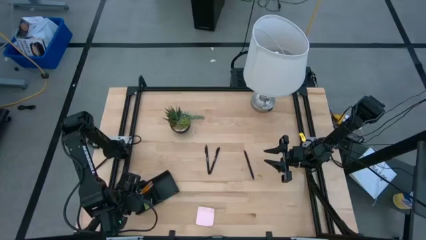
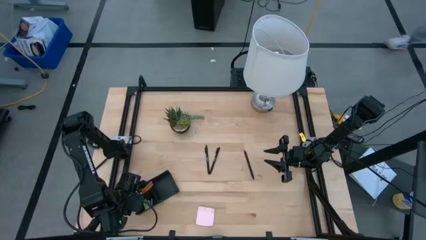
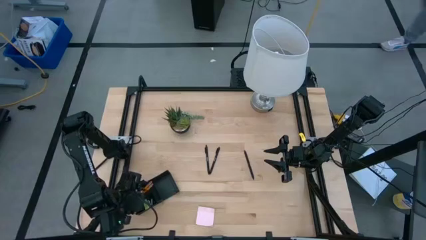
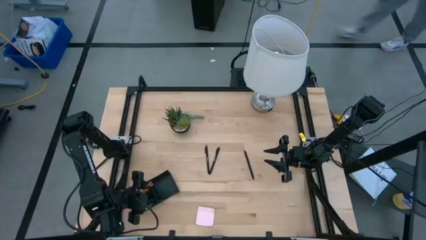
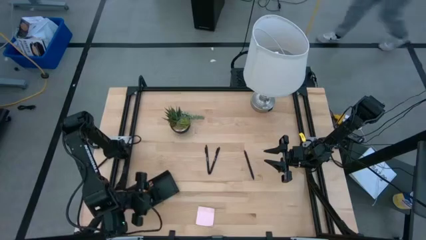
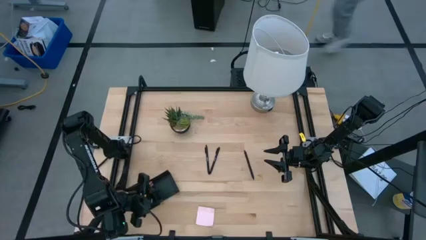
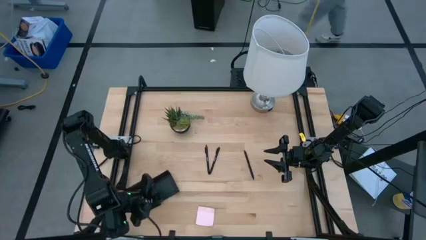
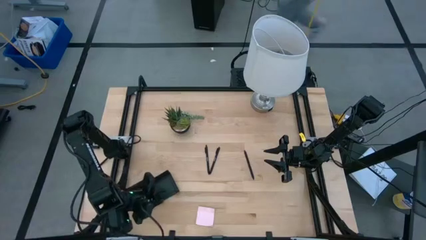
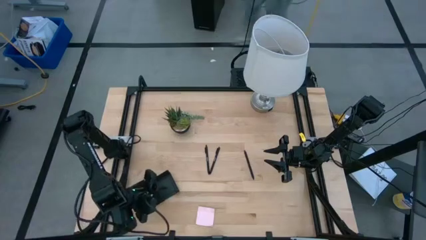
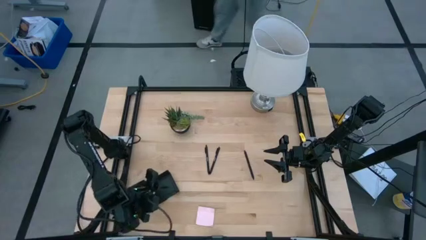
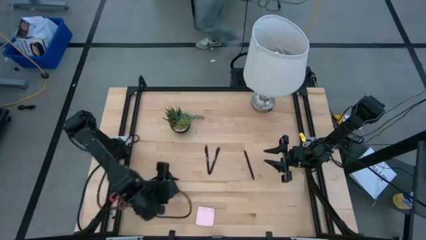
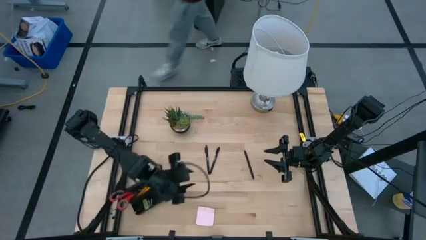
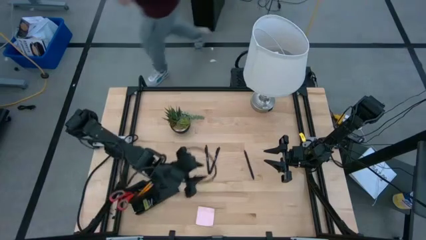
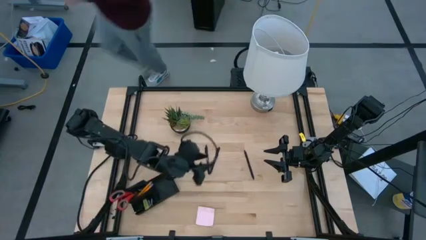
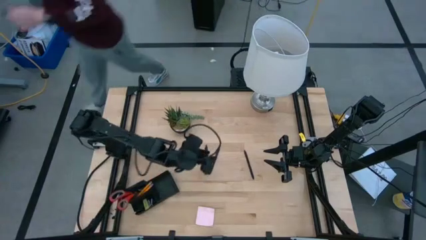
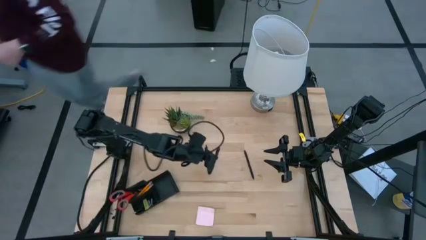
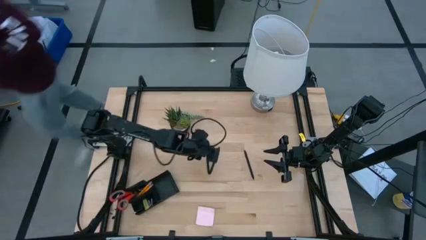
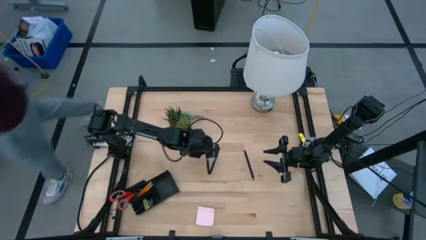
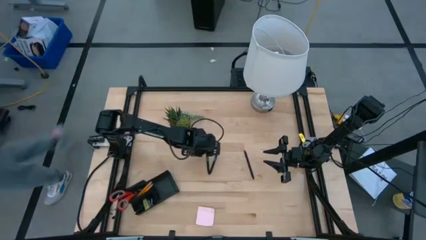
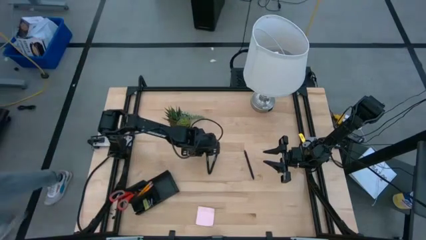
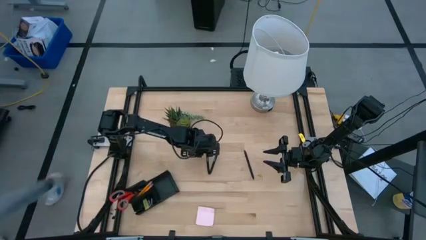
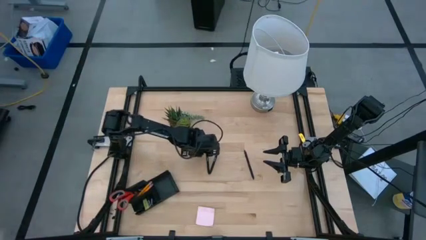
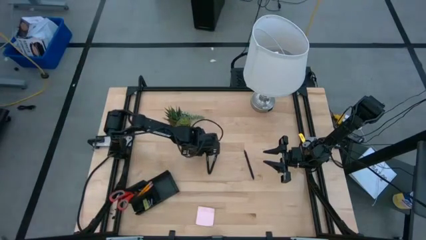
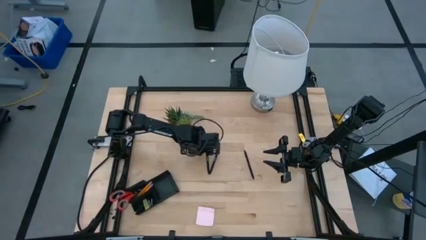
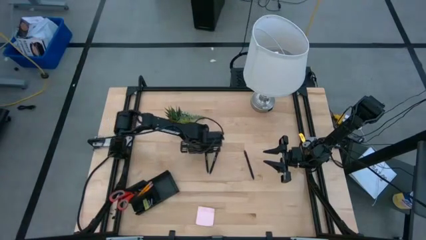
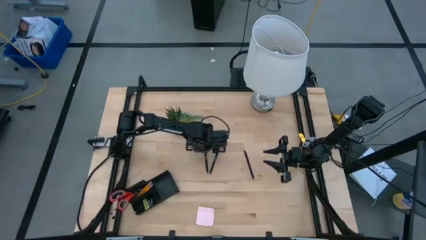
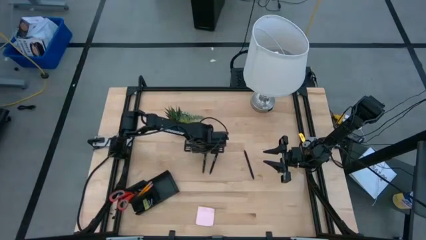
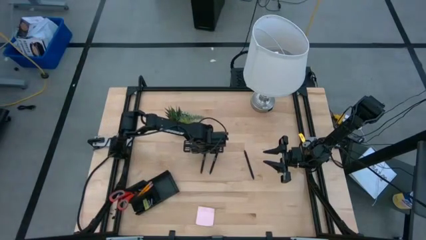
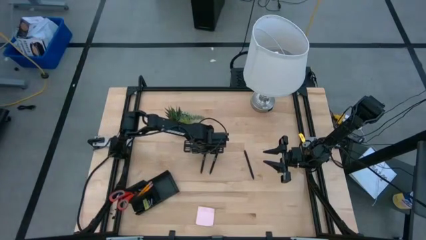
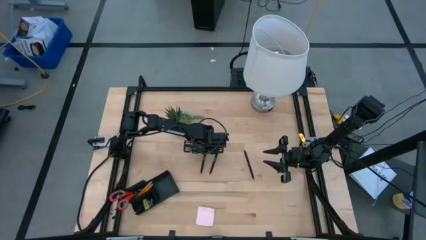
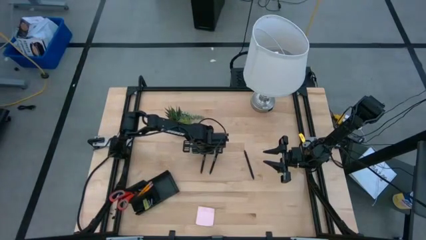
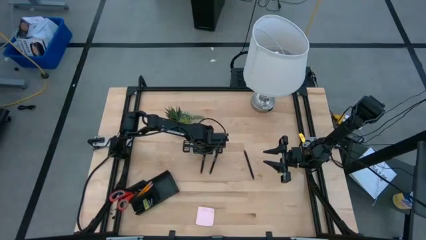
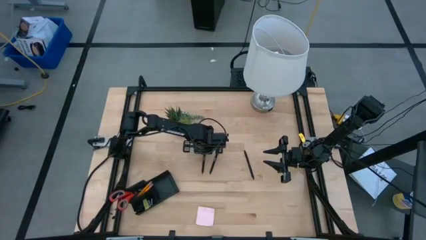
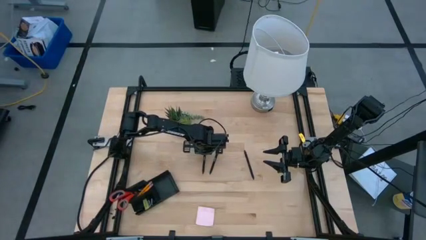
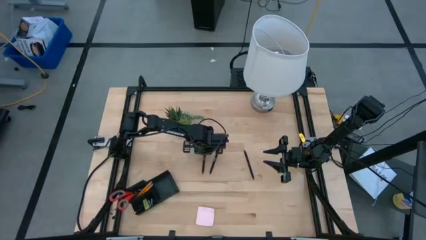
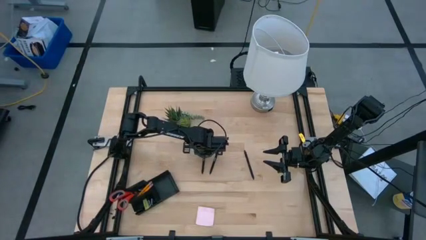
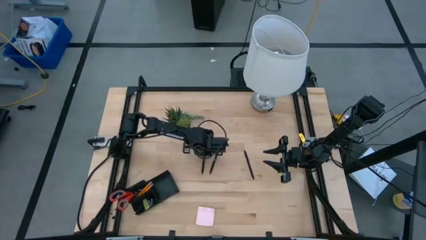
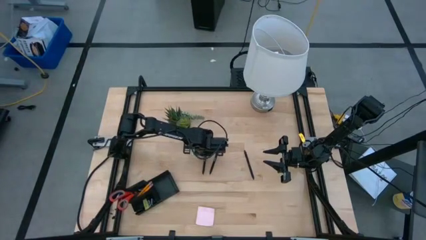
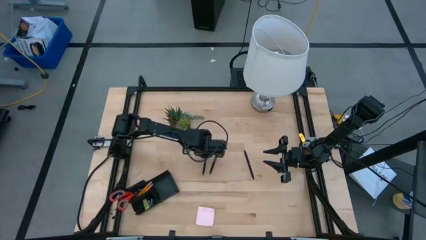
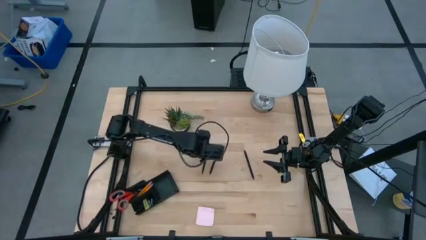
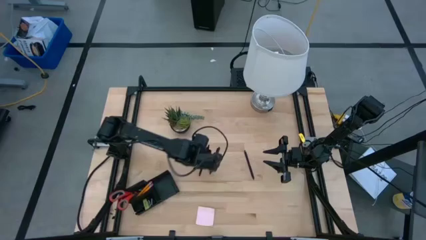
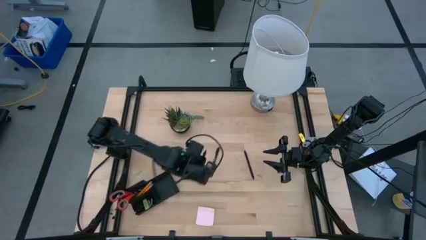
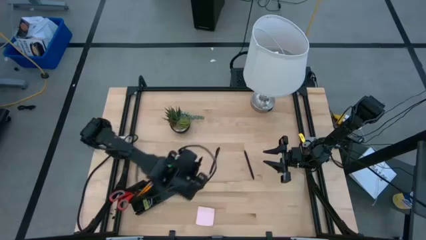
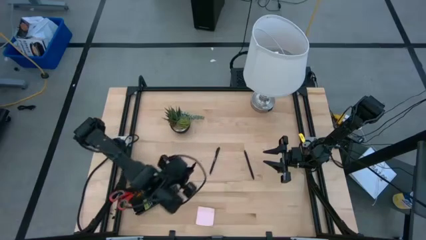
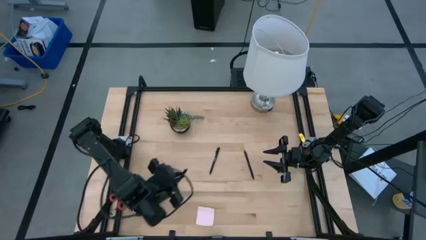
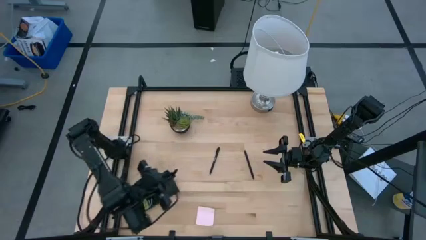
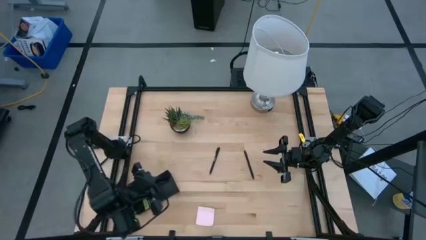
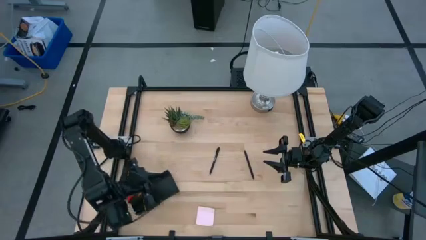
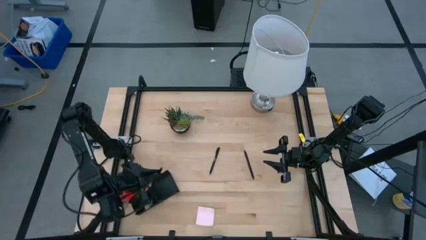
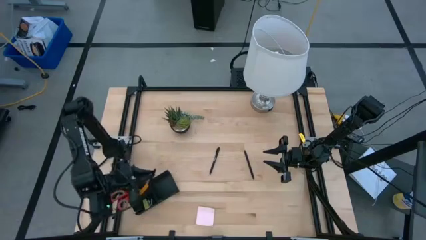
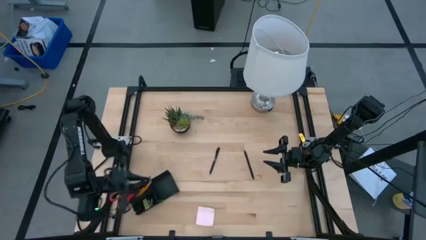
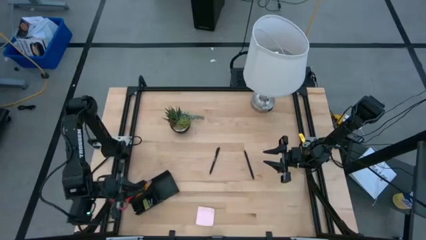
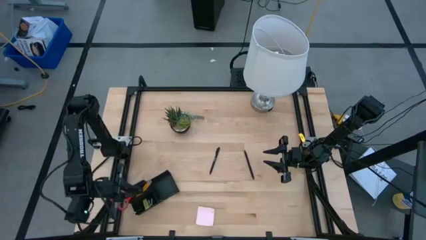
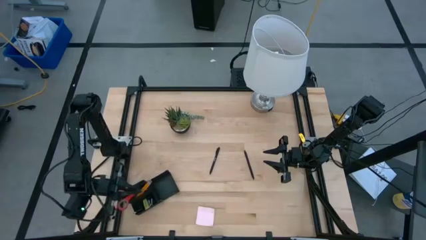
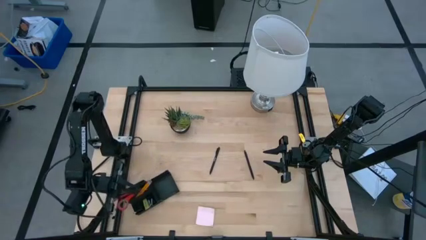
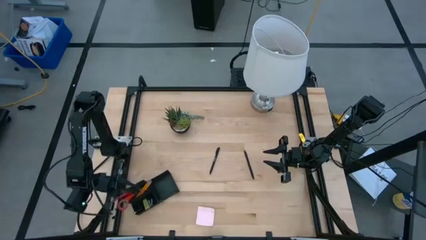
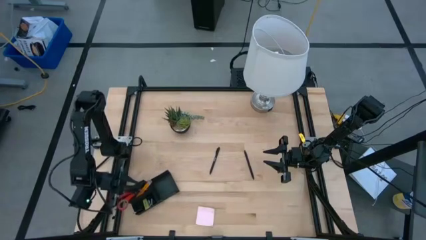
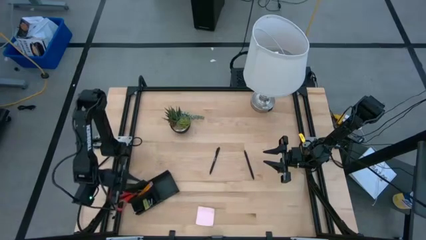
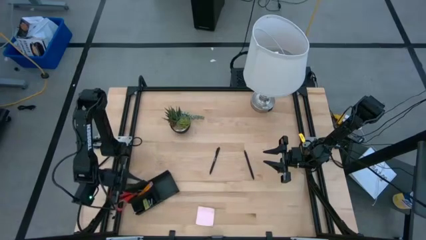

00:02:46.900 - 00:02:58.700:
Task: Pick and place office supplies into organizer
Put the left pen into the top left section of the desk organizer

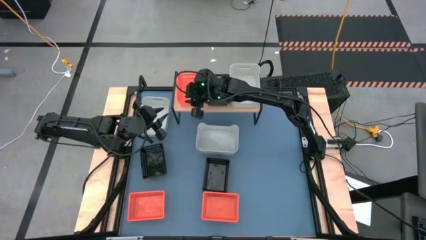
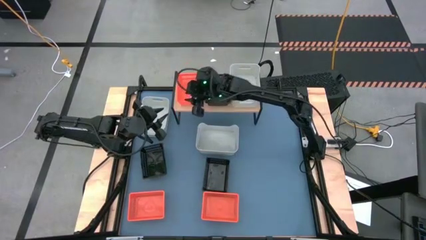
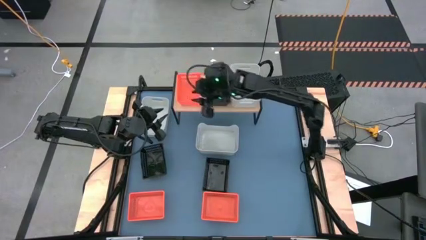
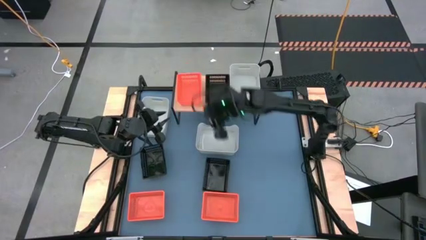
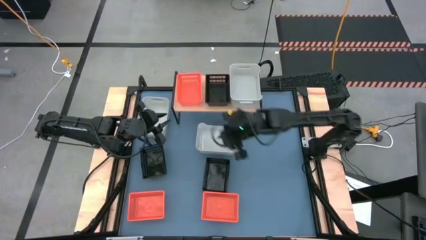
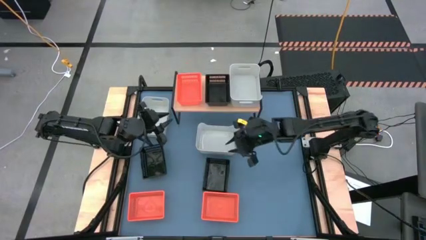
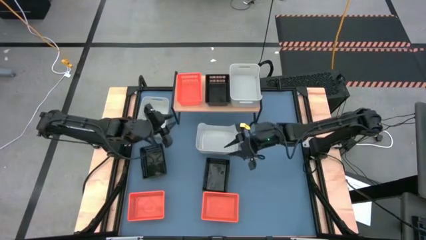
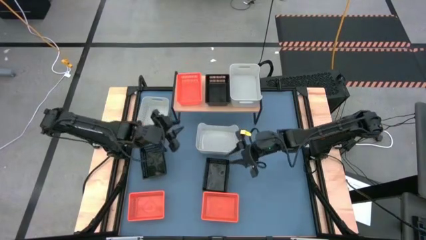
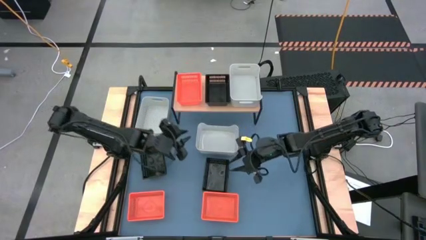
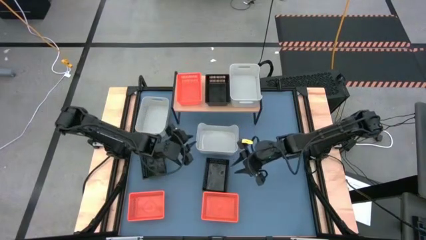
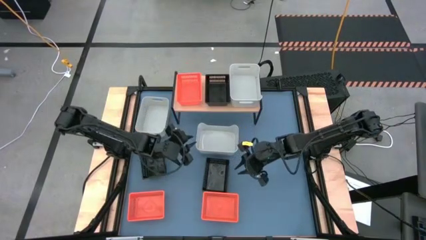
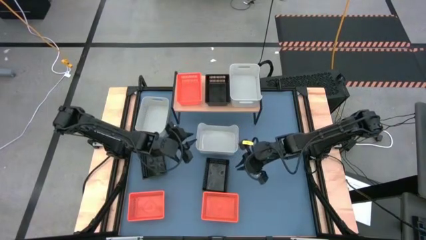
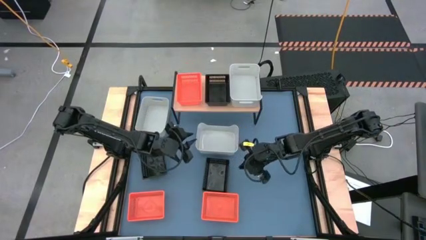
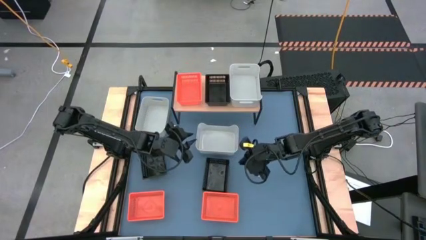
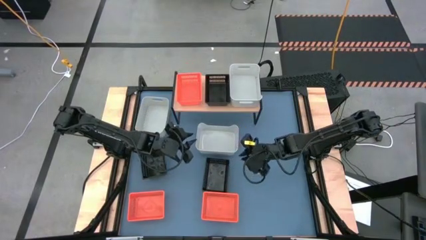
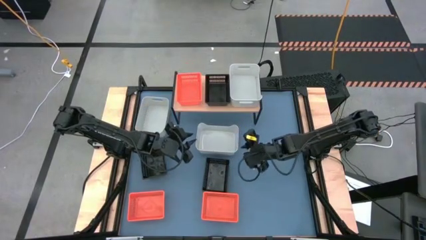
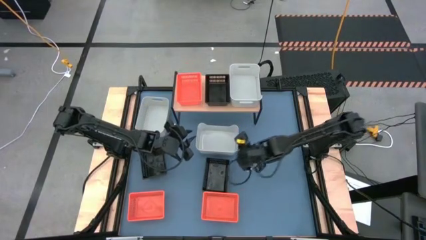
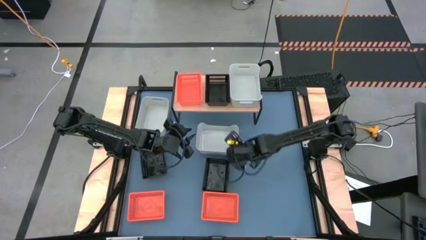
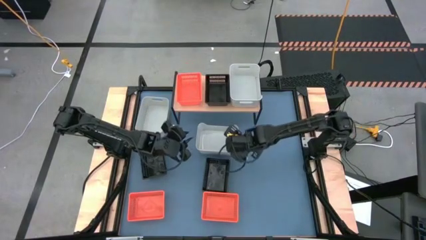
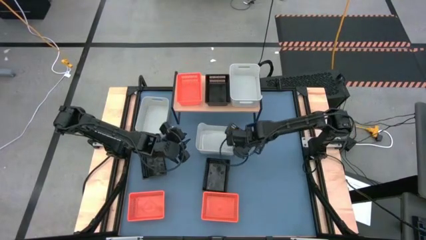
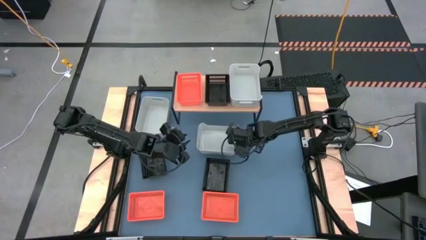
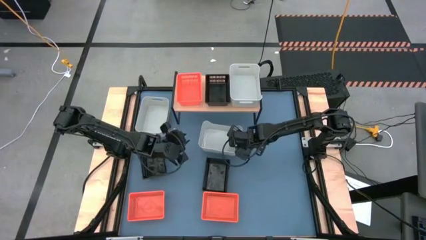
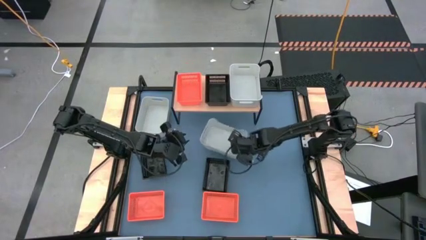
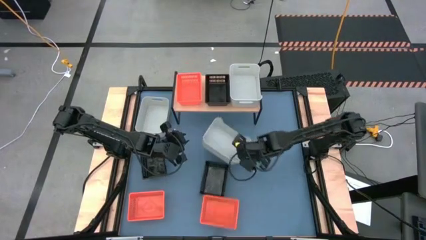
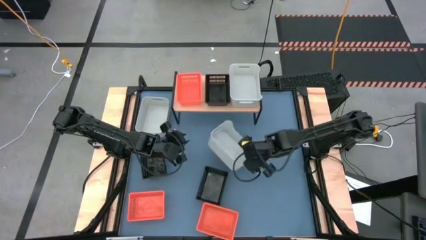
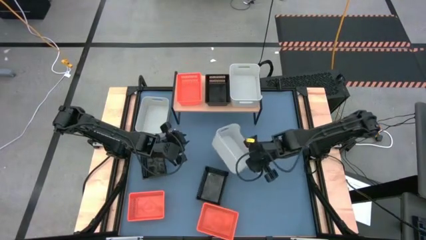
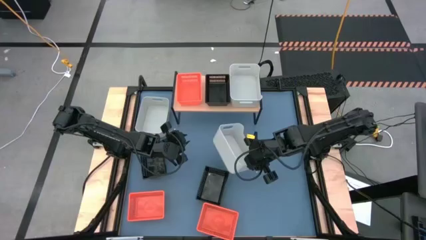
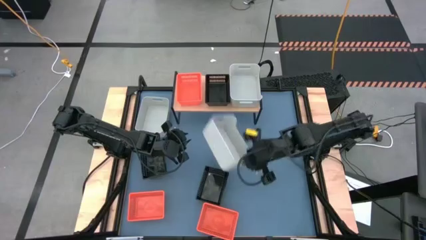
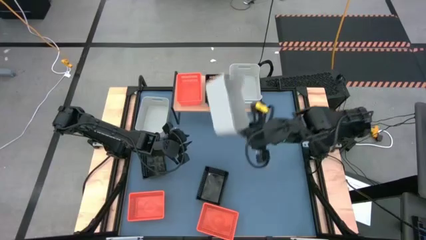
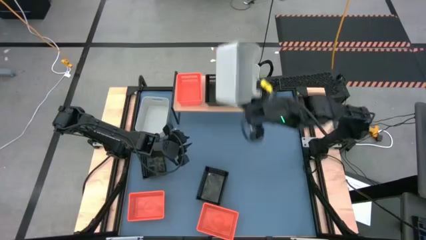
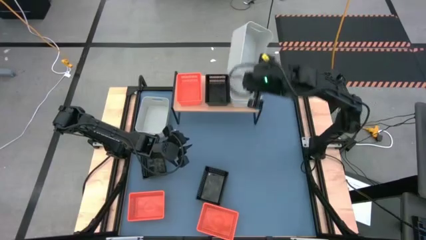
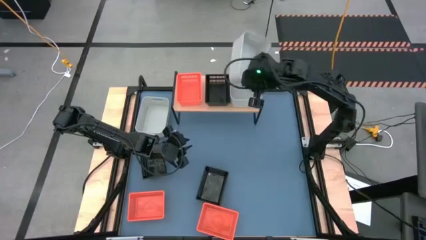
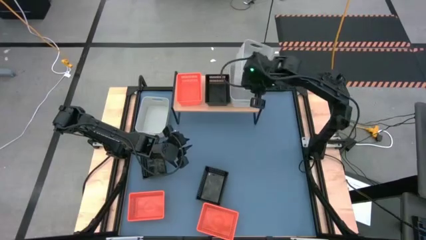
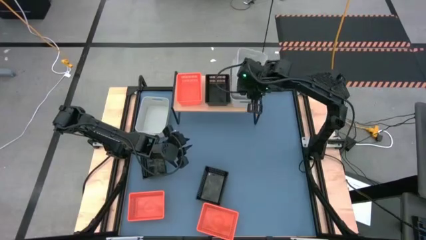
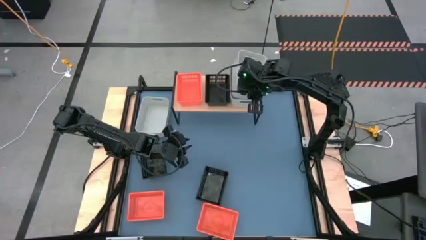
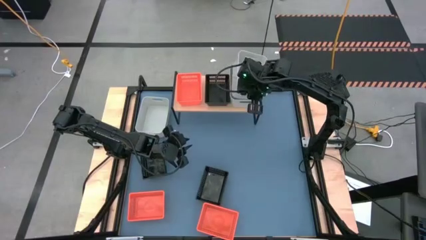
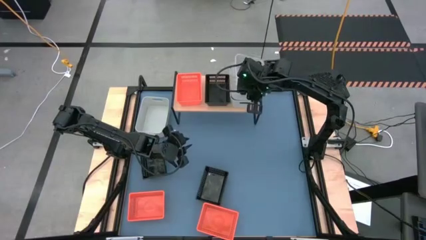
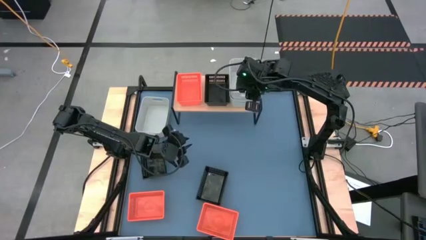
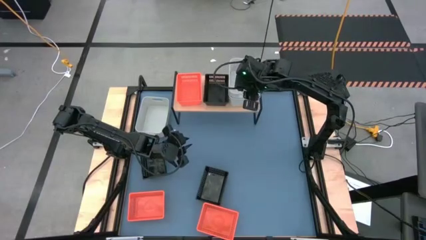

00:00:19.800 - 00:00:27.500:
Task: Stack baskets on shelf by color
Stack the right grey bin on top of the other grey bin on the shelf
